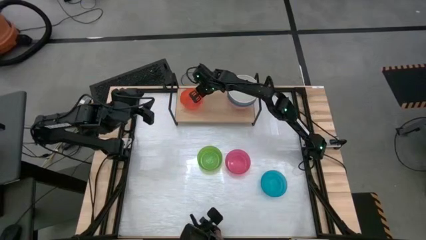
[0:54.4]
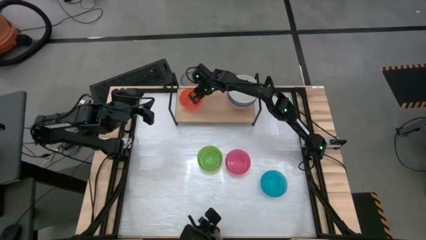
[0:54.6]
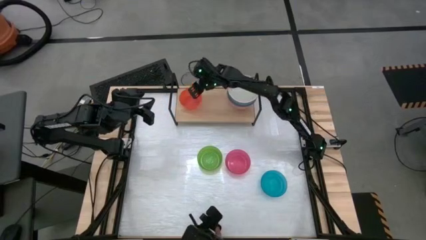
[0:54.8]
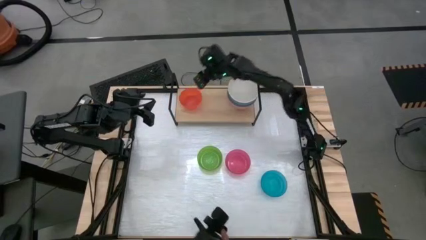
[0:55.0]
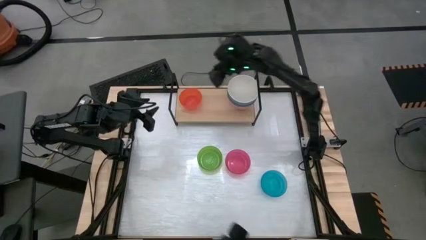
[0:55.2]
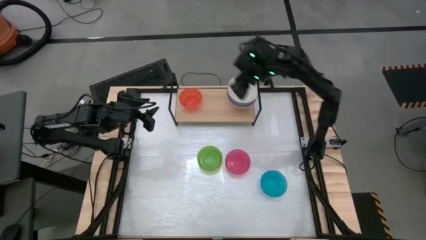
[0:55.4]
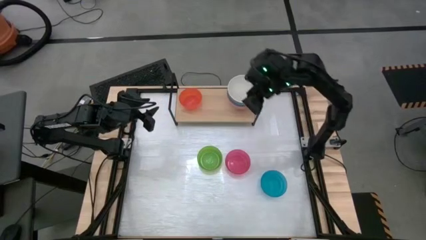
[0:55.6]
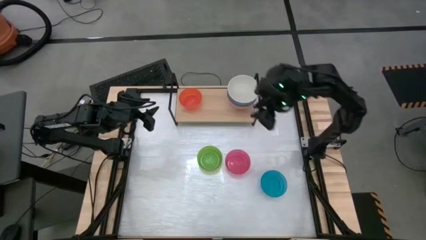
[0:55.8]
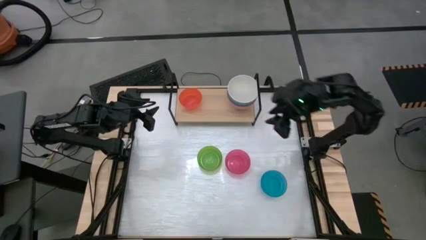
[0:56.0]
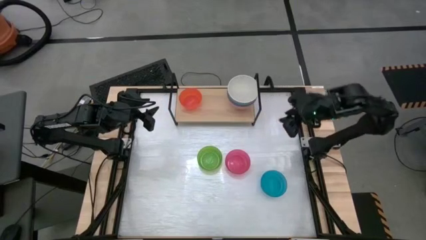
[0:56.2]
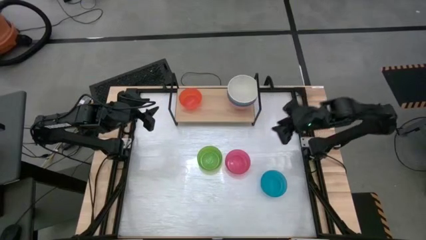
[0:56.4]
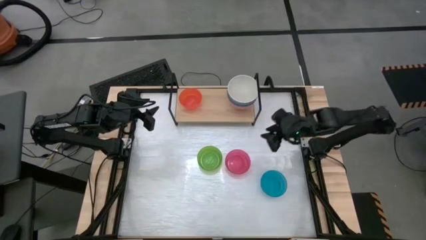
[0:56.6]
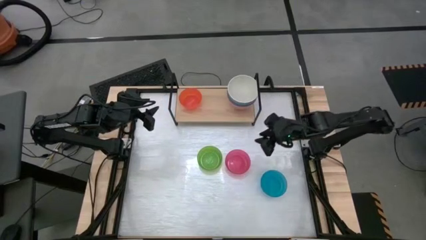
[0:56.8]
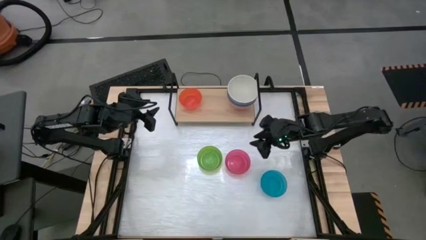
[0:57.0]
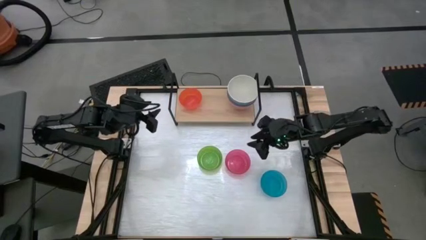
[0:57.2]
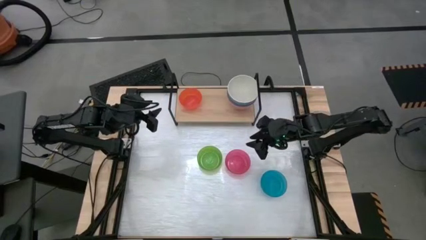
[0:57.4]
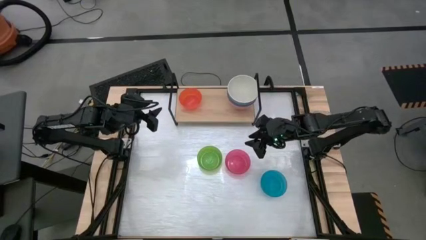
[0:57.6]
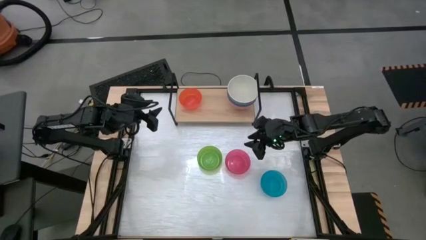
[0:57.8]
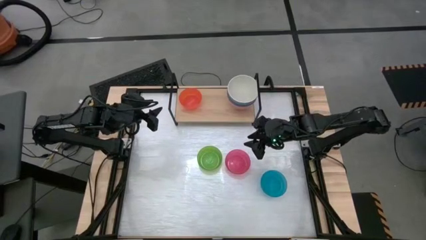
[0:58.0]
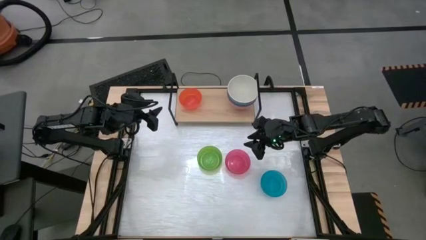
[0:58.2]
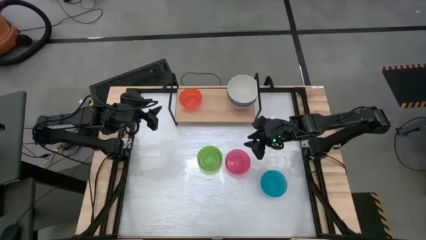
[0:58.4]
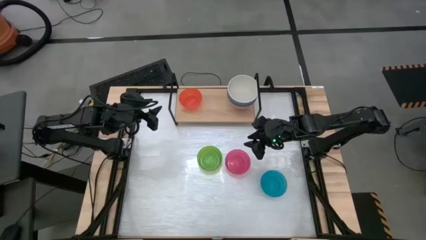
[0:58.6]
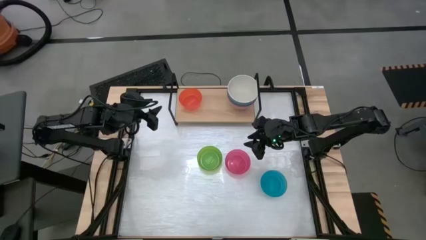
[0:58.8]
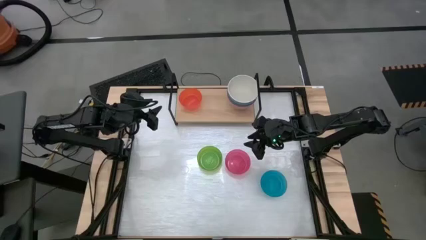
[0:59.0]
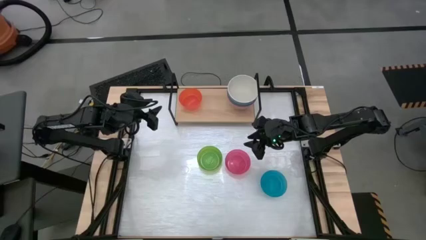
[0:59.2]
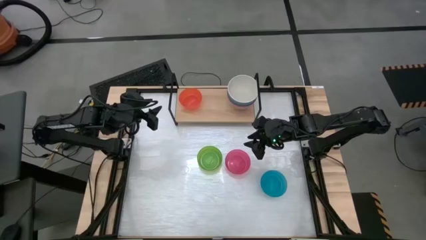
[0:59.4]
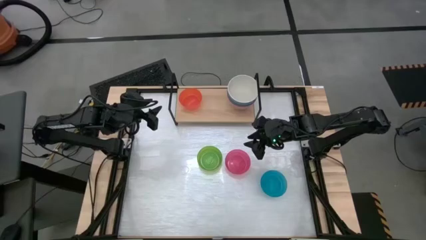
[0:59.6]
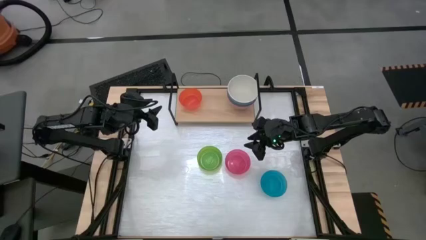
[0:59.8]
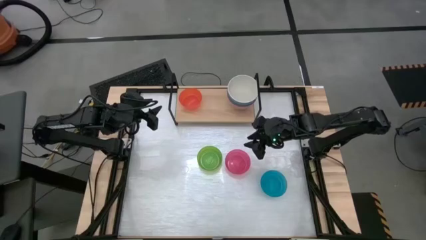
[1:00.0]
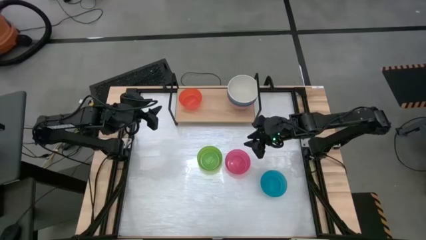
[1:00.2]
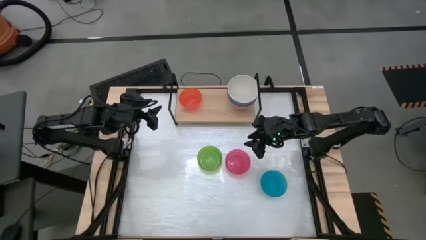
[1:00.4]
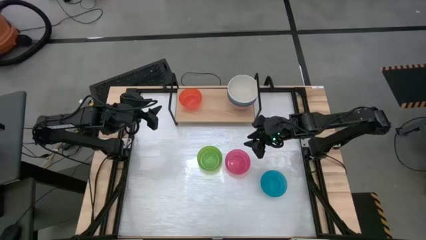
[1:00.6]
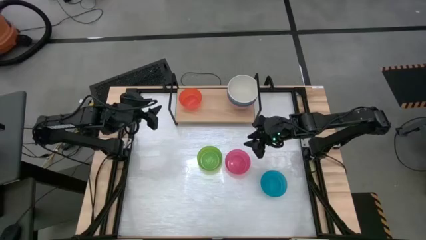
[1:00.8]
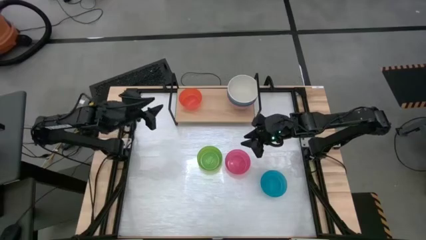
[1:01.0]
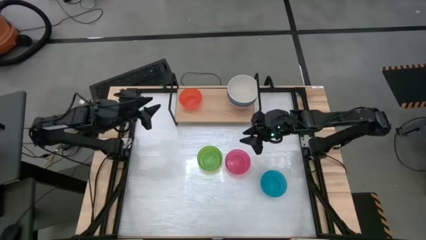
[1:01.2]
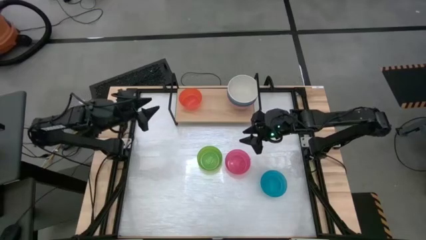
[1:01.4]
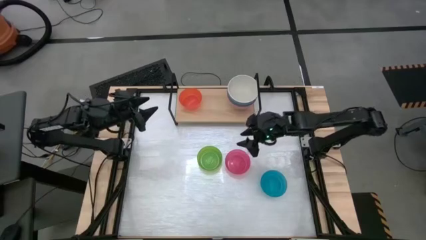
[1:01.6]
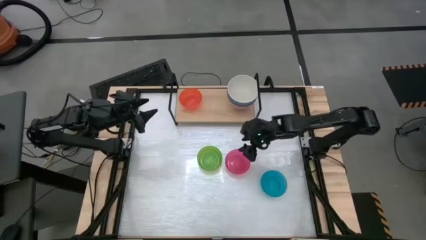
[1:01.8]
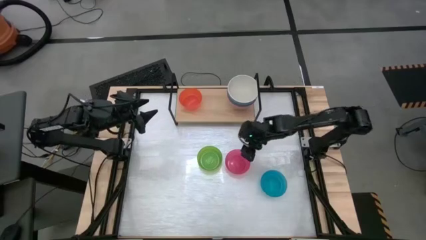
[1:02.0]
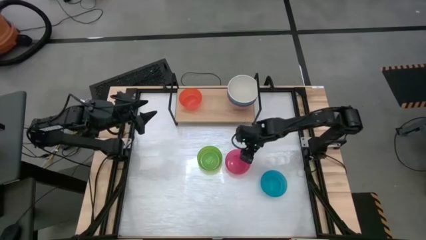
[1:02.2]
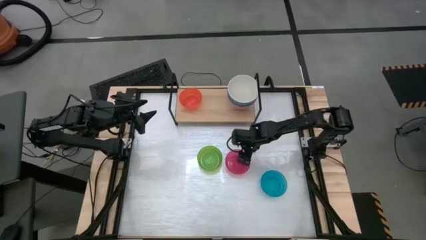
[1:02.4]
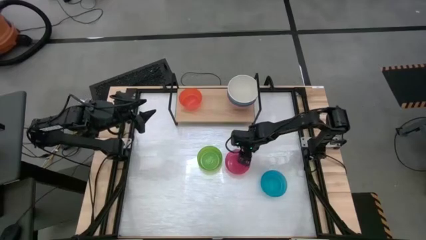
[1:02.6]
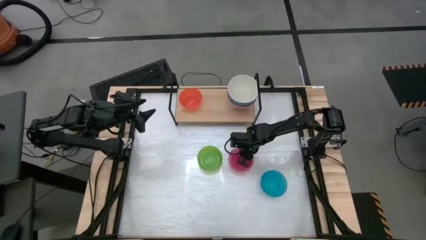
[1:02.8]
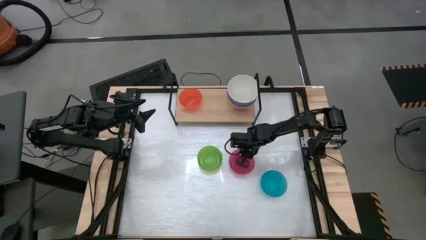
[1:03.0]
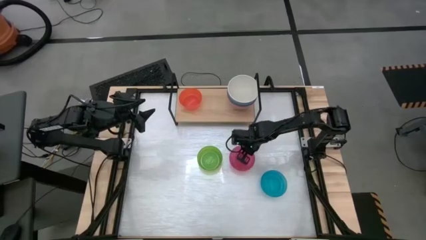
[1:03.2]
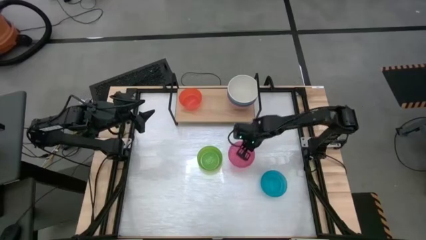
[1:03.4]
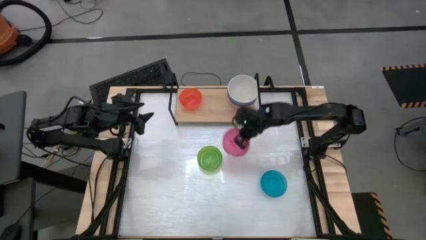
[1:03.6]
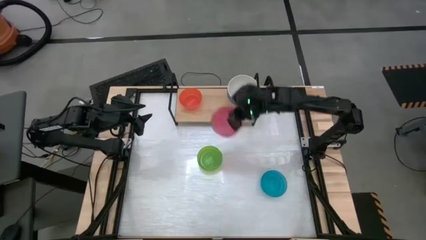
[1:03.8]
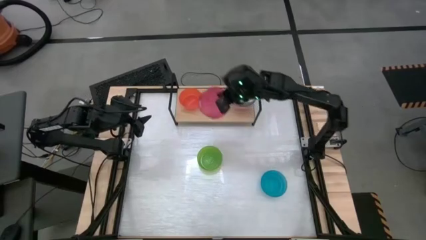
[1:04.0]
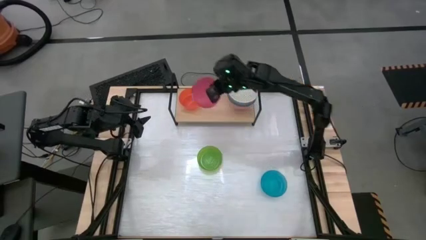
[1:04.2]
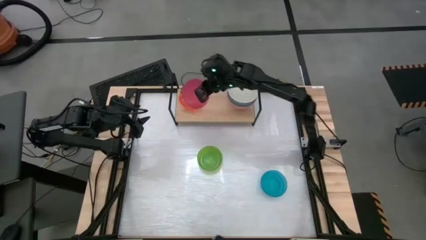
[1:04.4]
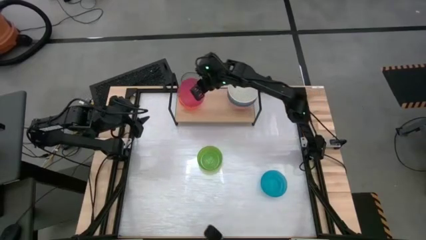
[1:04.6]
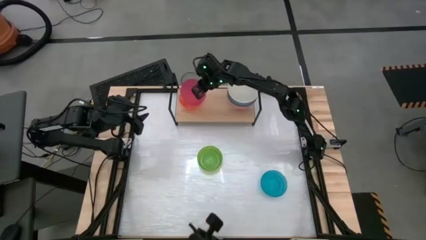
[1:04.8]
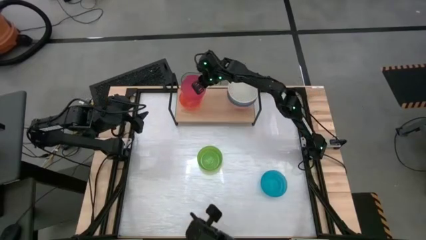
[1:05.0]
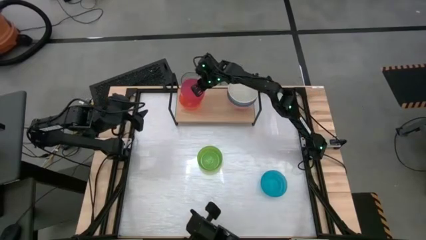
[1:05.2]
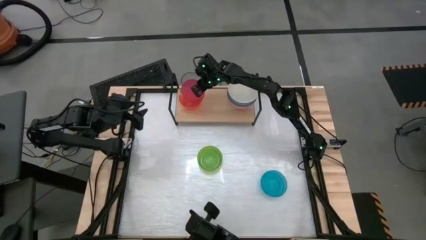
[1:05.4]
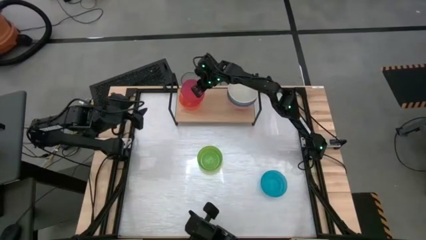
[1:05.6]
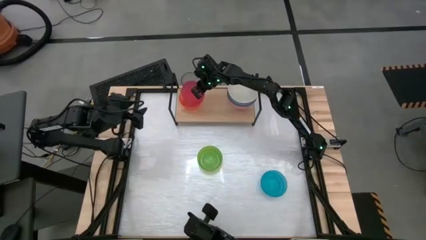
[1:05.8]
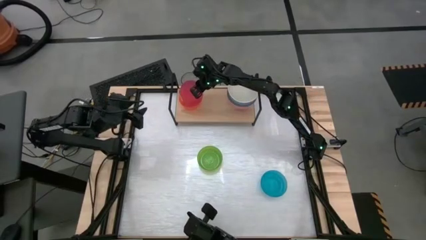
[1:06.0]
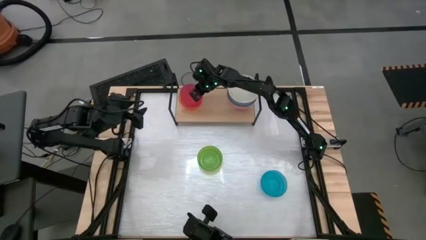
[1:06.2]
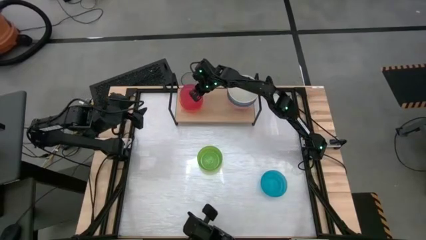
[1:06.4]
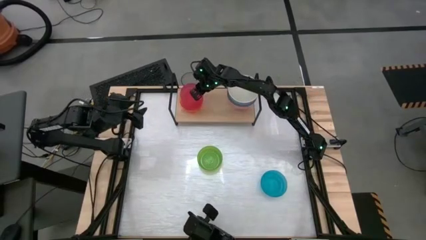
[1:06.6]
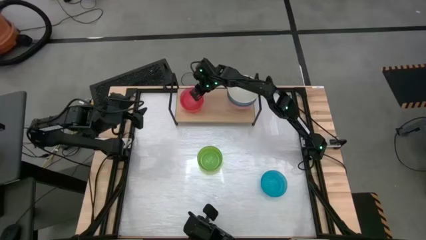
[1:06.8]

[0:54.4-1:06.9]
Task: Place and stack bowls onto a shelf
Stack the light pink bowl into the orange bowl on the shelf

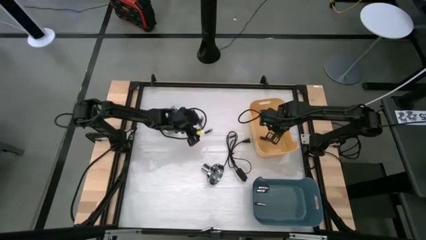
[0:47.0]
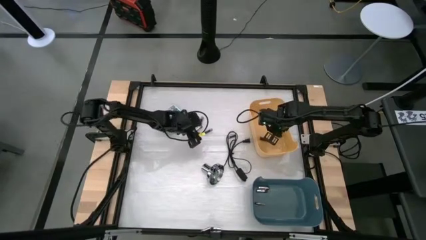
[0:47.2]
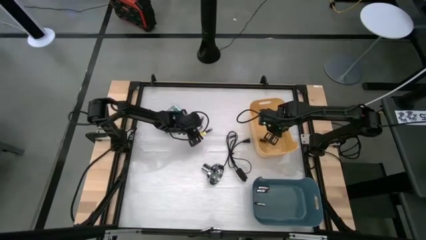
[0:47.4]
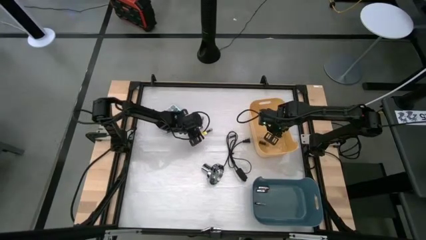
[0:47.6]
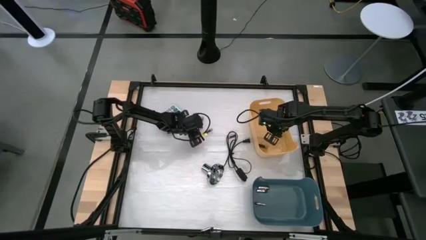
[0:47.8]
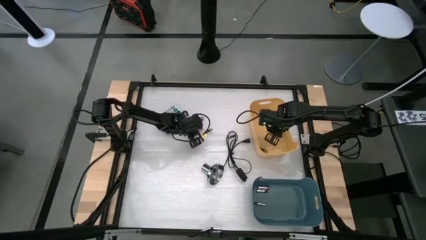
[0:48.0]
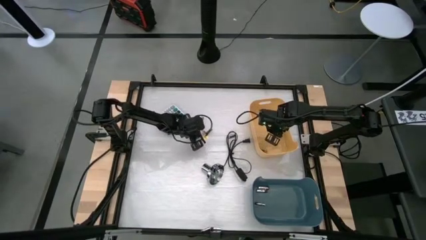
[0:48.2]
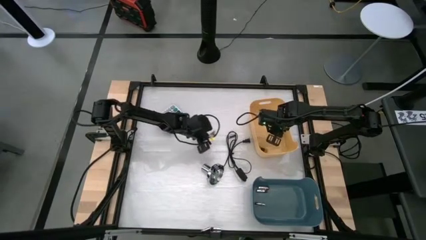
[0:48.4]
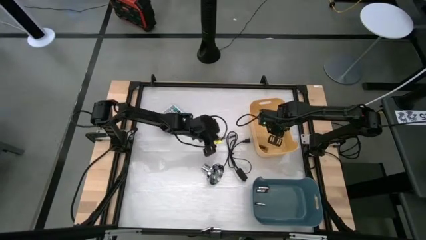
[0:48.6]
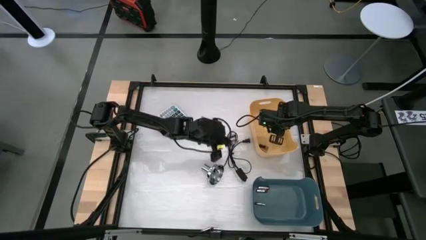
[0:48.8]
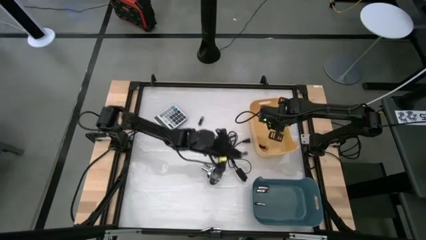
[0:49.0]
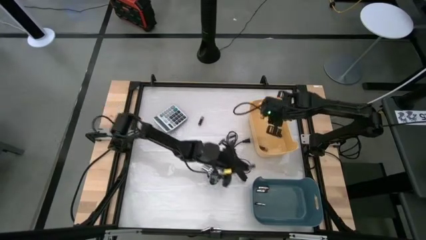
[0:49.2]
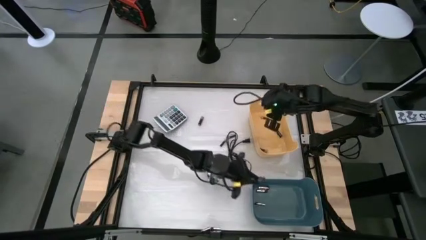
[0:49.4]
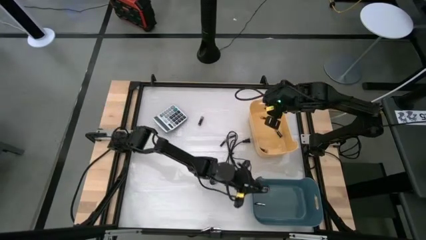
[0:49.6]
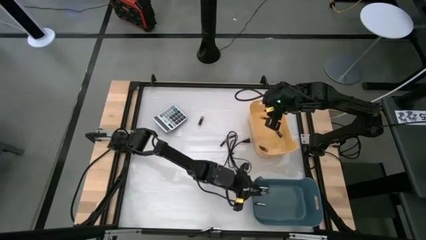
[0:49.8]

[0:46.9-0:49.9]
Task: Sort batteries
Put the white battery into the blue bin
